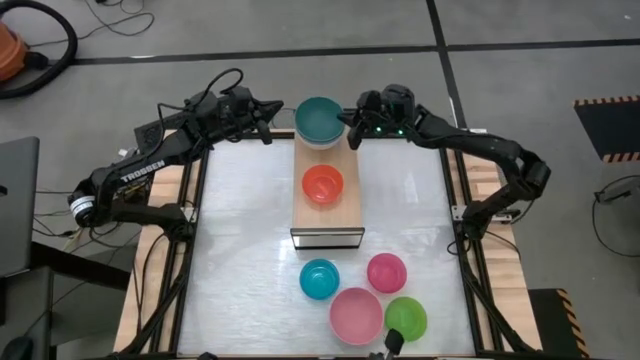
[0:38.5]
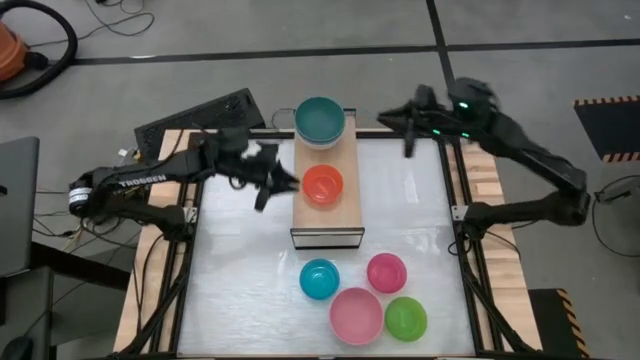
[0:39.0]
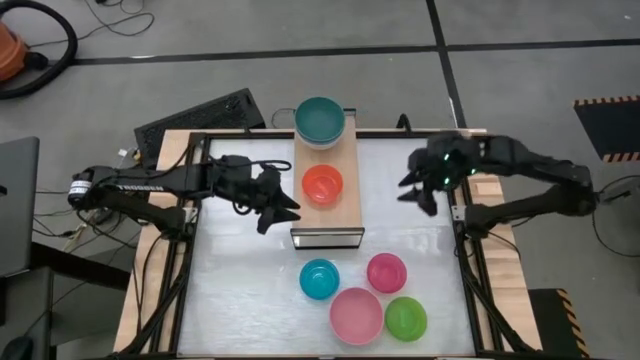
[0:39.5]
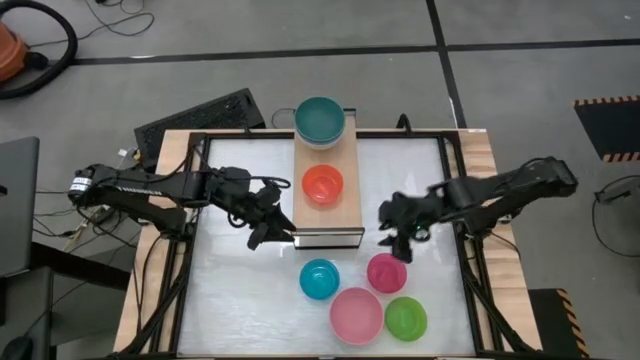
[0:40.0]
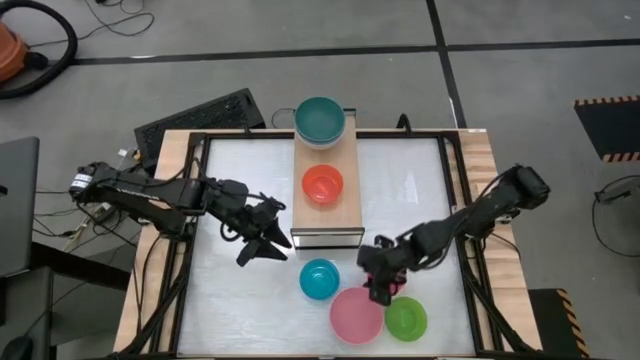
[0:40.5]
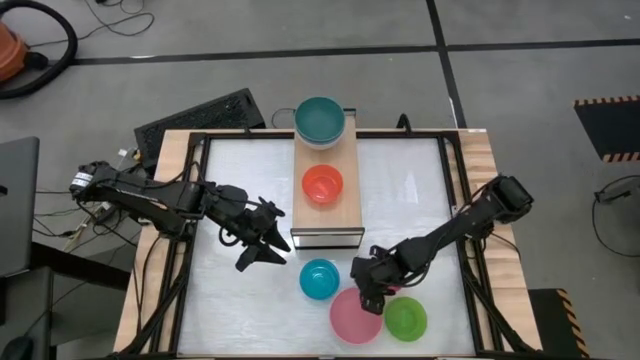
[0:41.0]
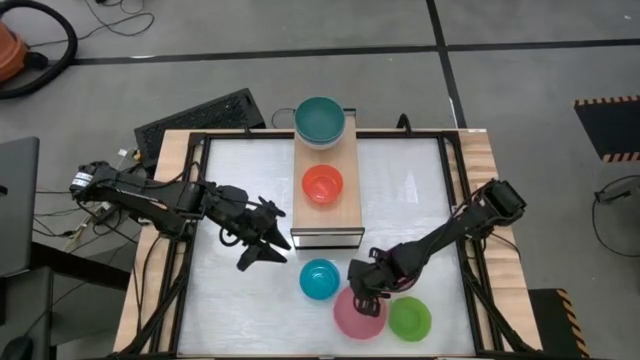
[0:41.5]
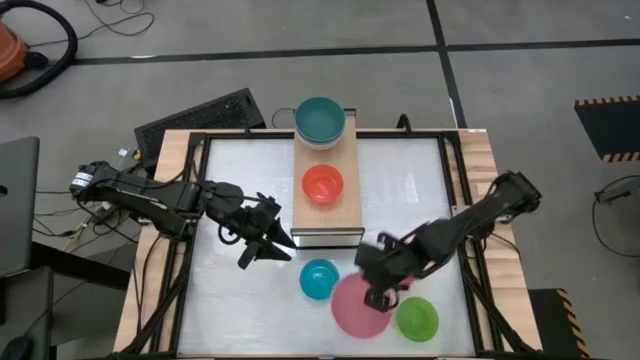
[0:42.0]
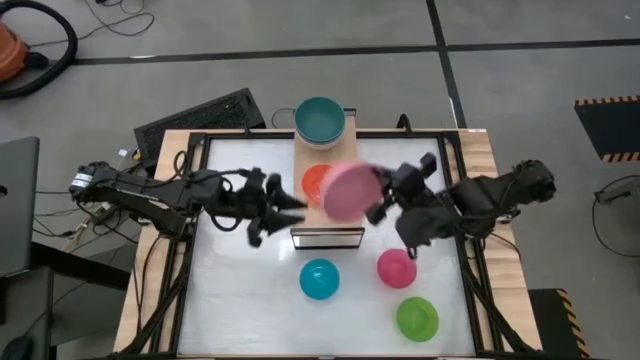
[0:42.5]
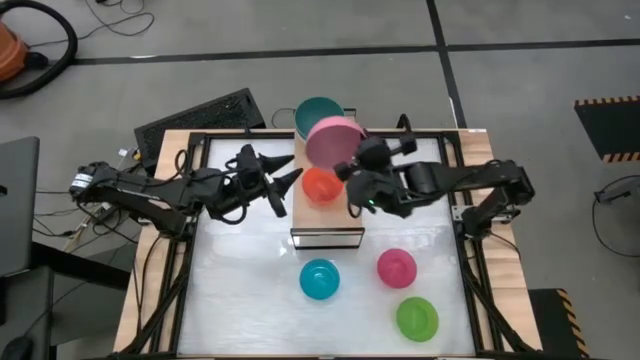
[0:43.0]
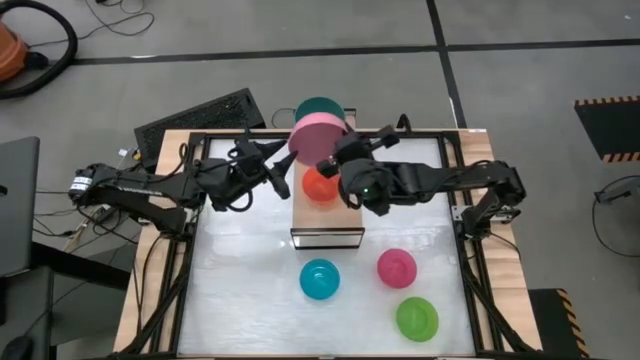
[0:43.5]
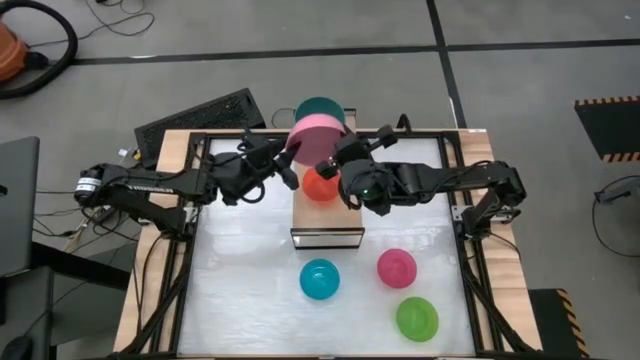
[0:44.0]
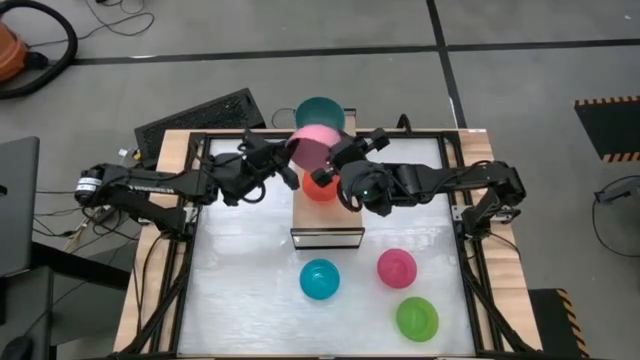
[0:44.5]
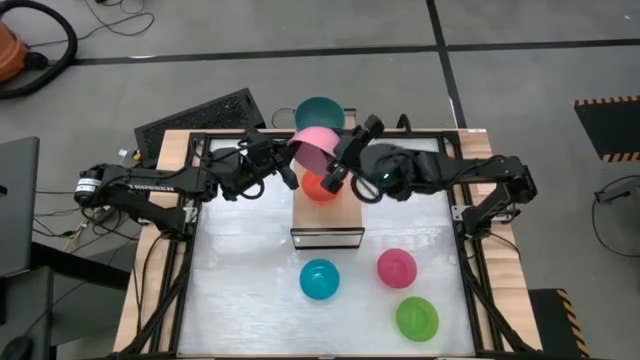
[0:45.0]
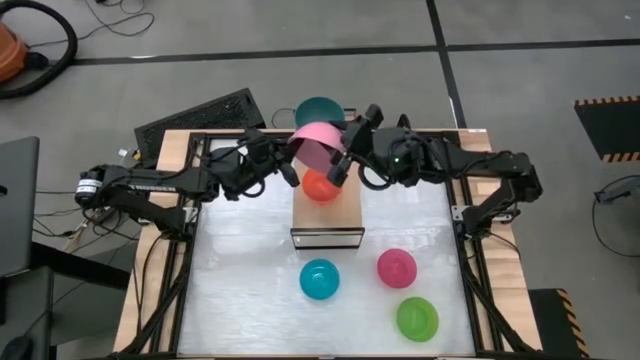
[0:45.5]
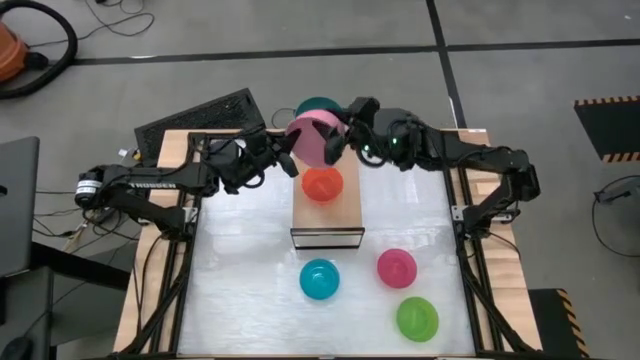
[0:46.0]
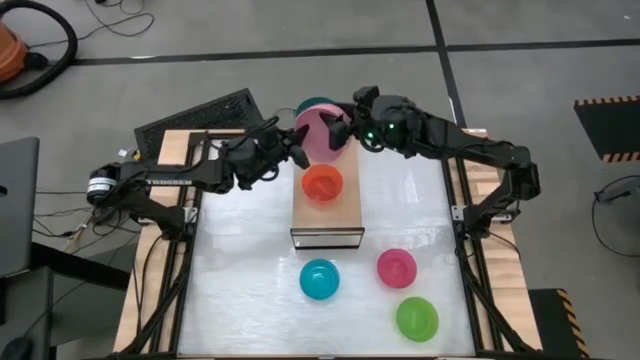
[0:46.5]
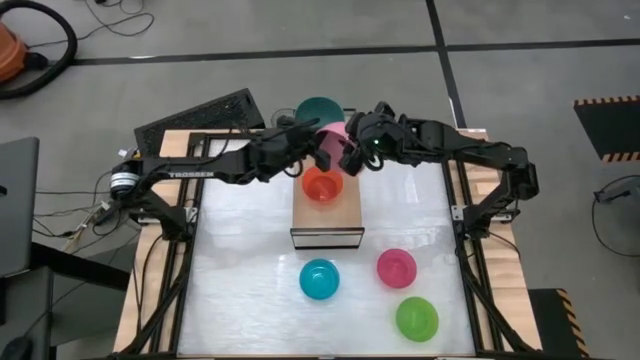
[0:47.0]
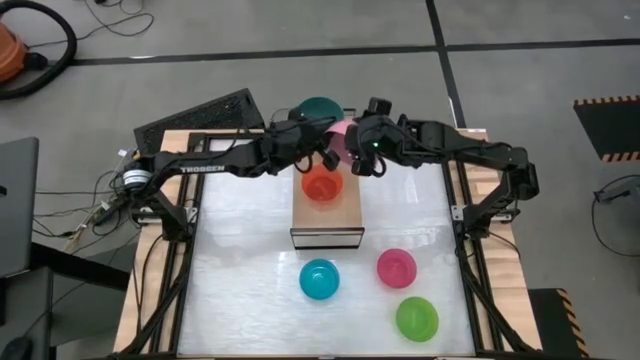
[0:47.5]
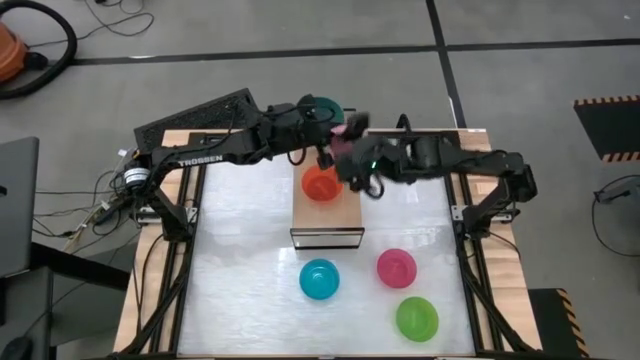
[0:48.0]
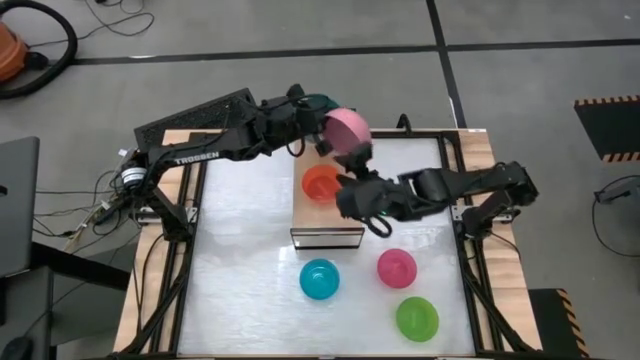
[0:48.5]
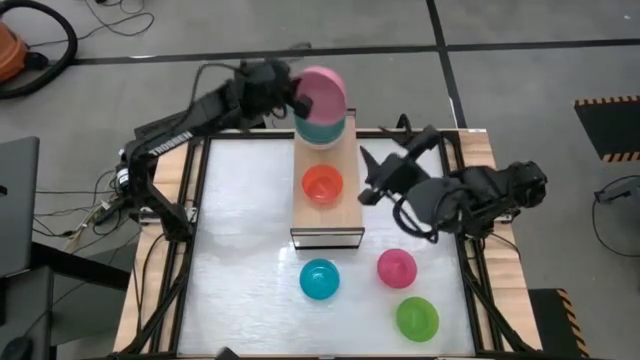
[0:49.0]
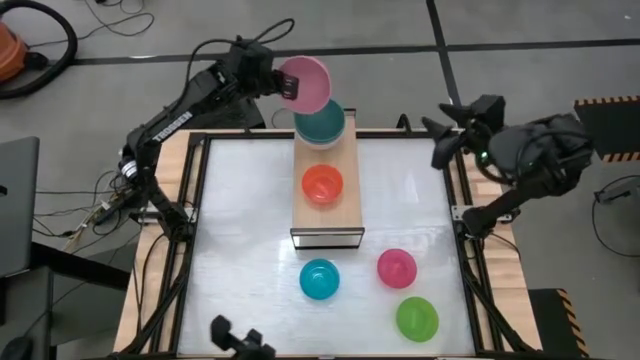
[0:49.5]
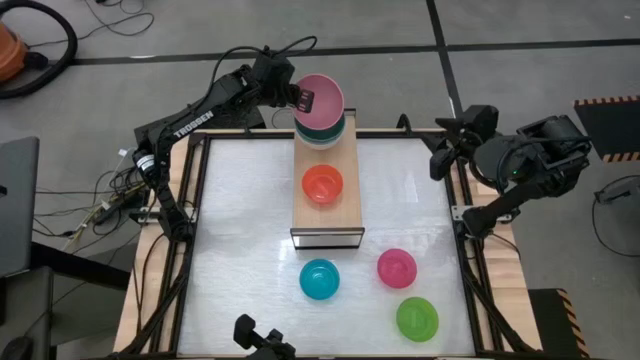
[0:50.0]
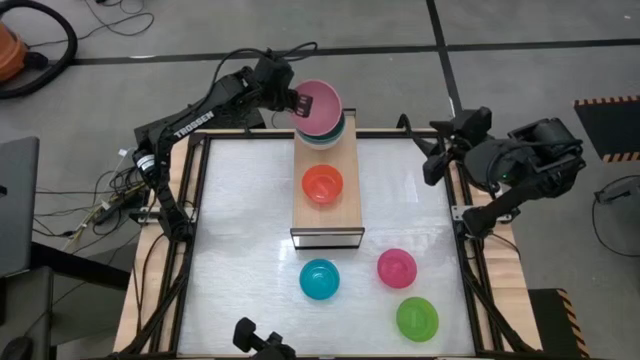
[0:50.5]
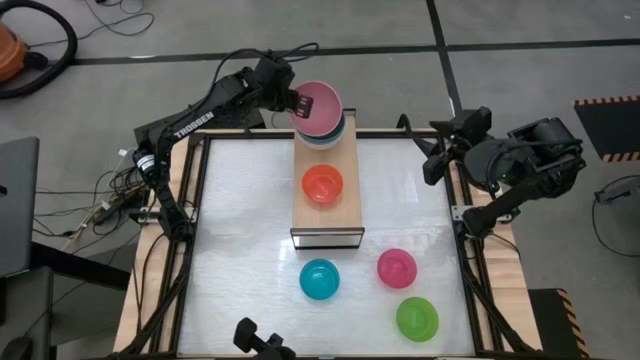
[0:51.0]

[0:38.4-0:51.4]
Task: Place and stack bowls onto a shelf
Stack the pink bowl on top of the dark green bowl on the shelf

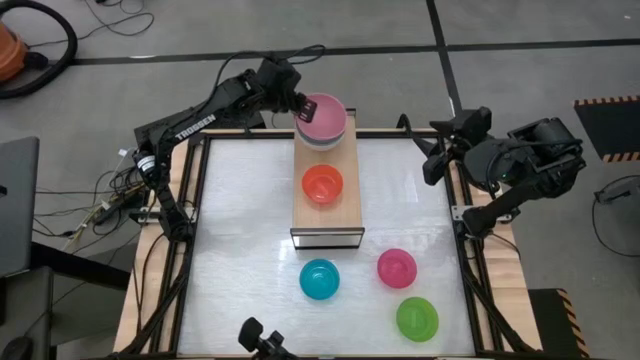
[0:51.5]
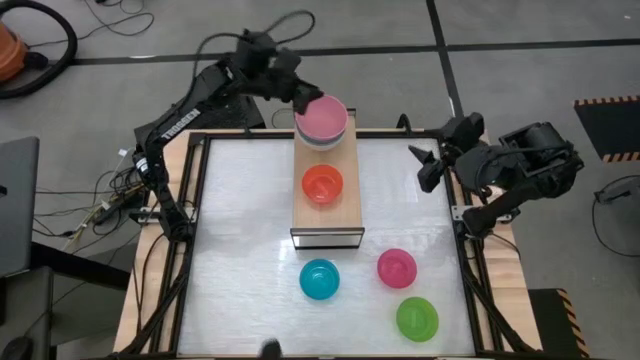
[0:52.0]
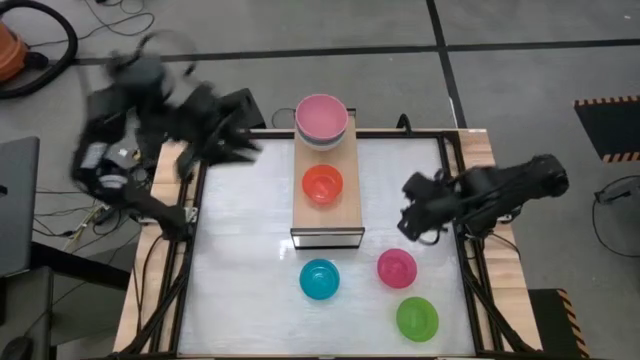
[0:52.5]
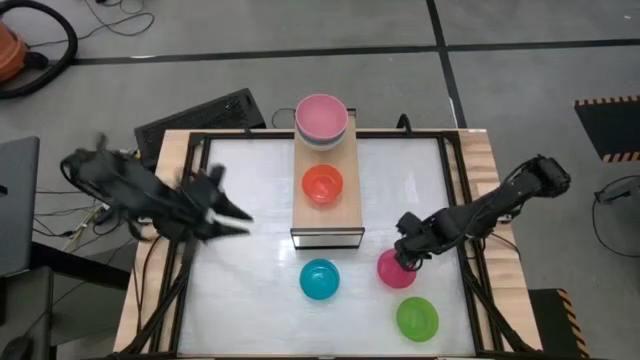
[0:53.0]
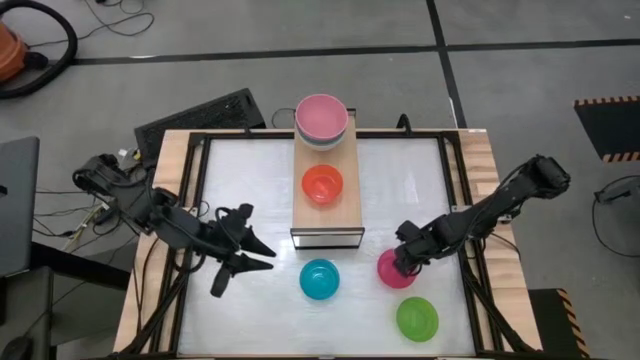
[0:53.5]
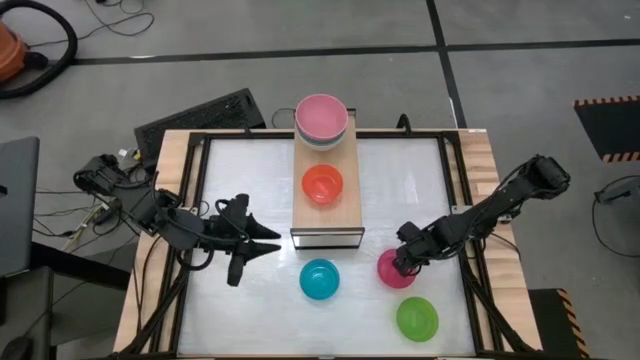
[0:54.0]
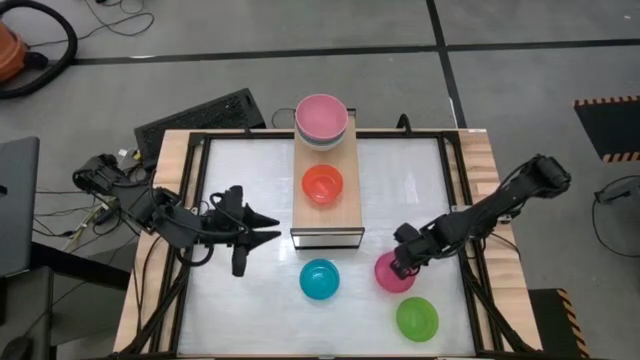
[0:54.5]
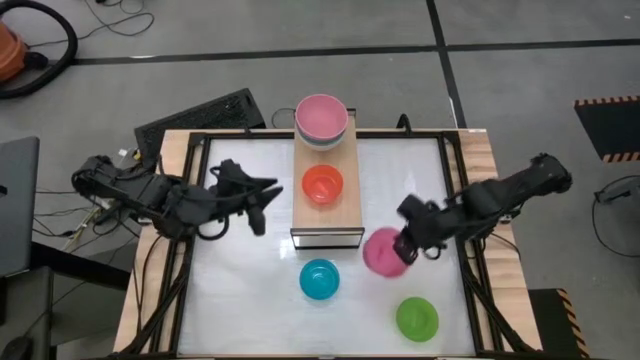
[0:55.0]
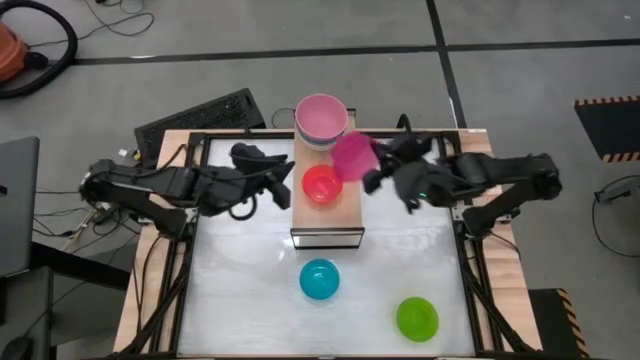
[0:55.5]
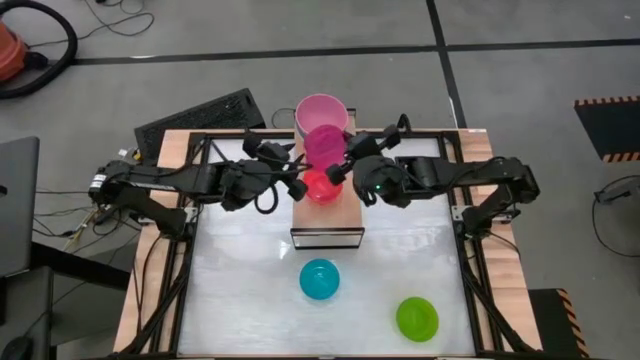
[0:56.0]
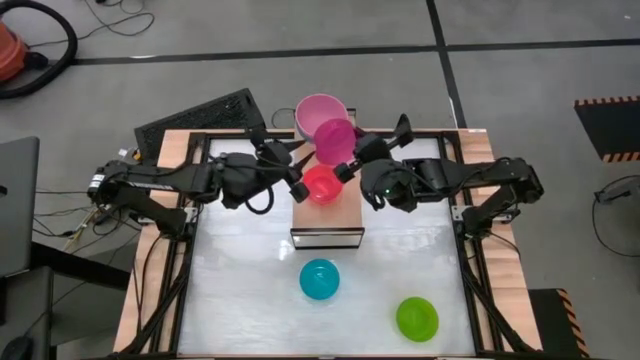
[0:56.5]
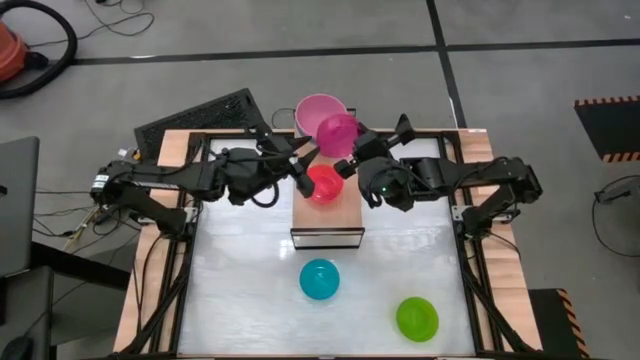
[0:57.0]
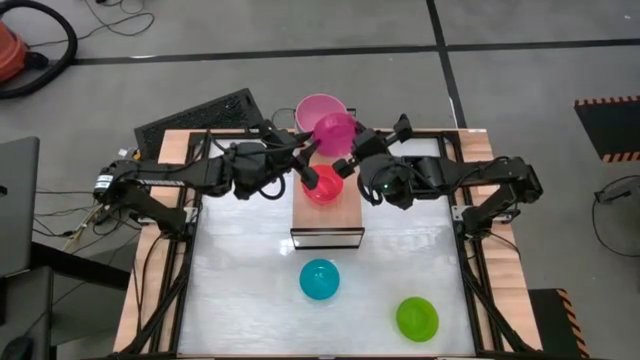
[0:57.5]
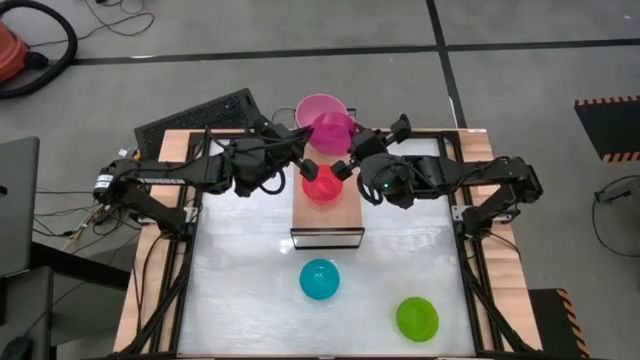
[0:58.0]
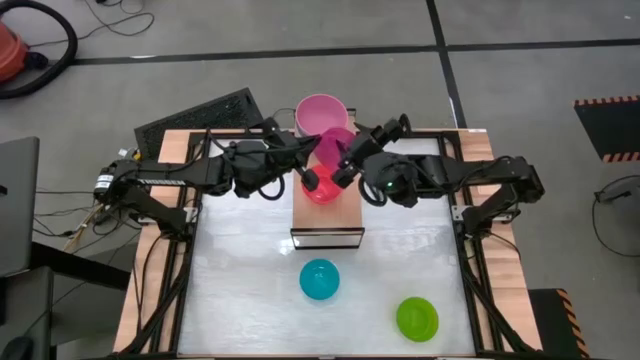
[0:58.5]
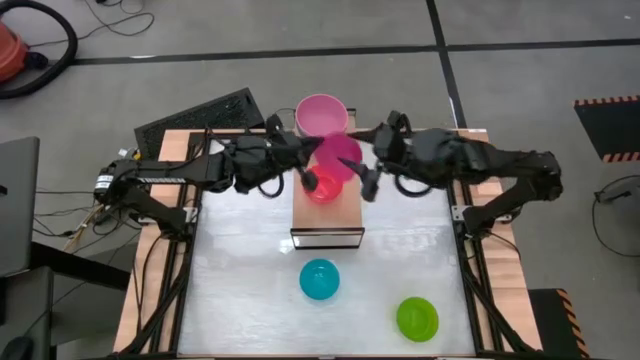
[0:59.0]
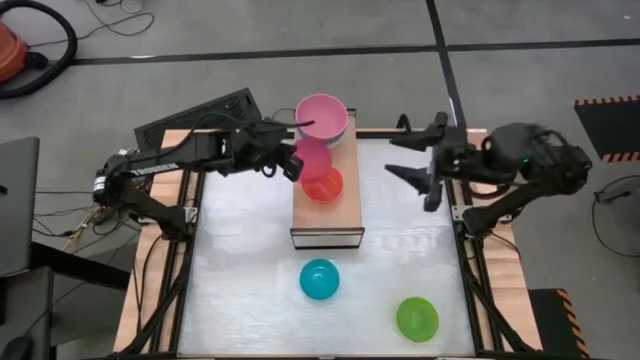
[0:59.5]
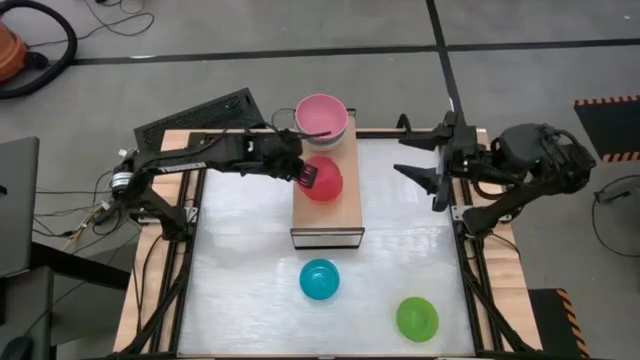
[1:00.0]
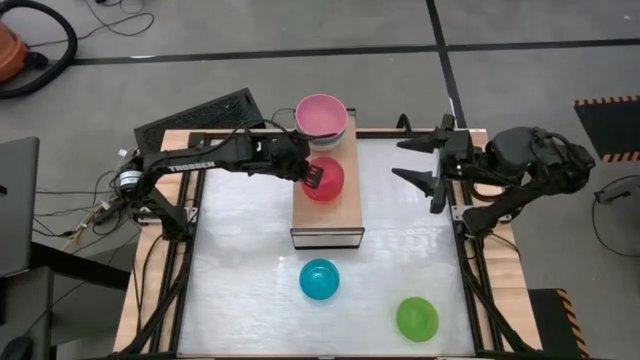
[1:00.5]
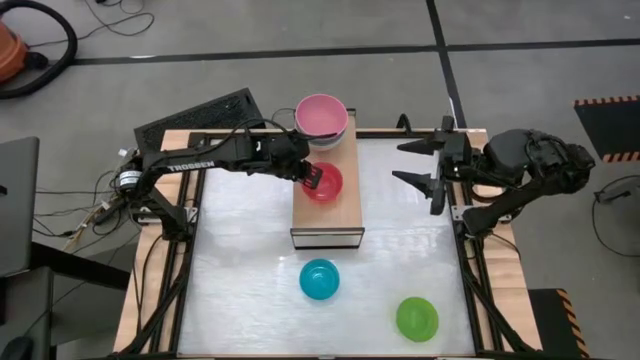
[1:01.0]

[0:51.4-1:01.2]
Stack the pink bowl on top of the orange bowl on the shelf
